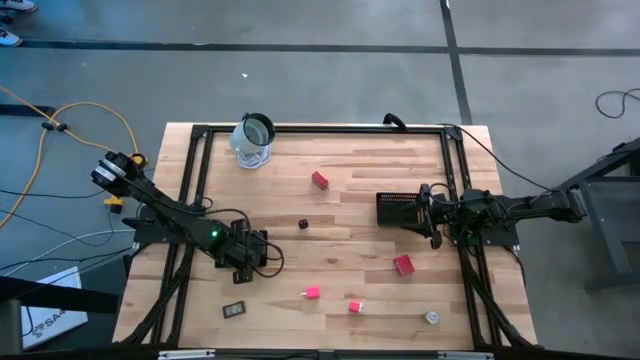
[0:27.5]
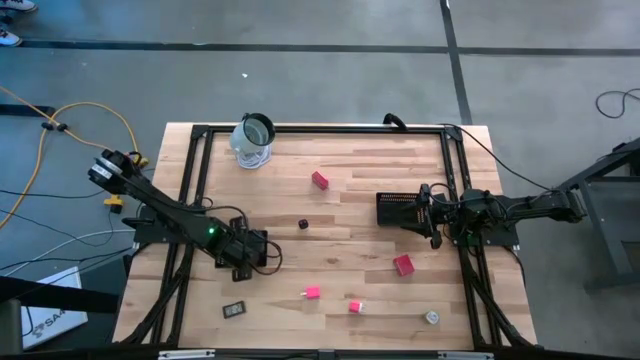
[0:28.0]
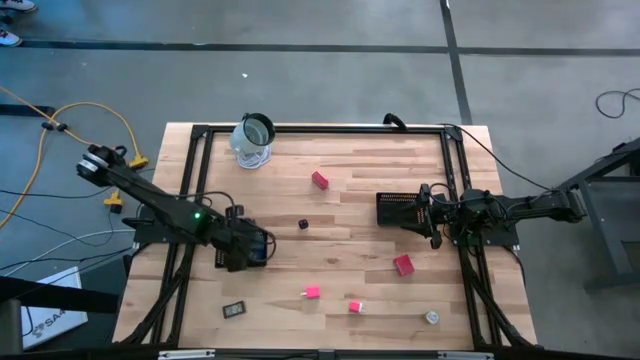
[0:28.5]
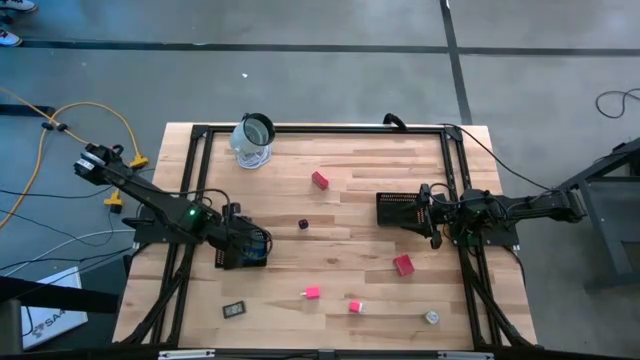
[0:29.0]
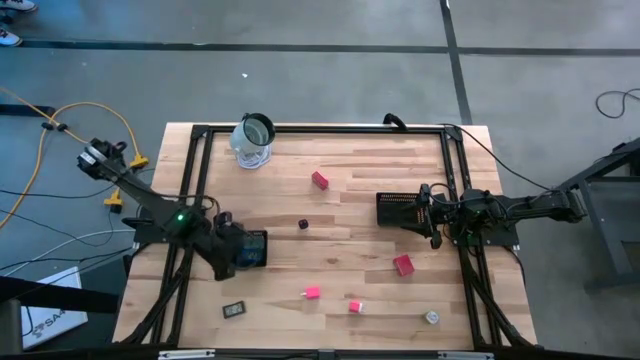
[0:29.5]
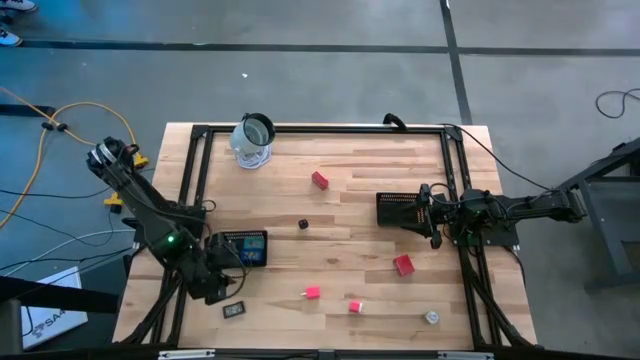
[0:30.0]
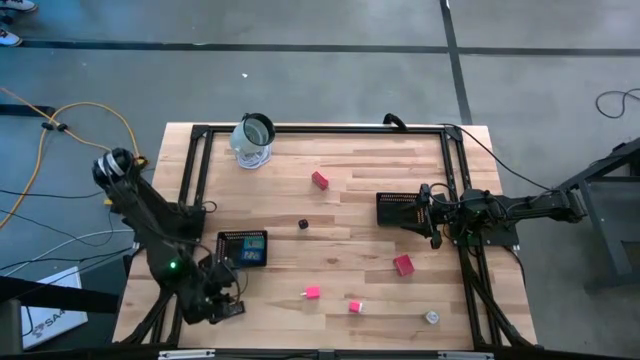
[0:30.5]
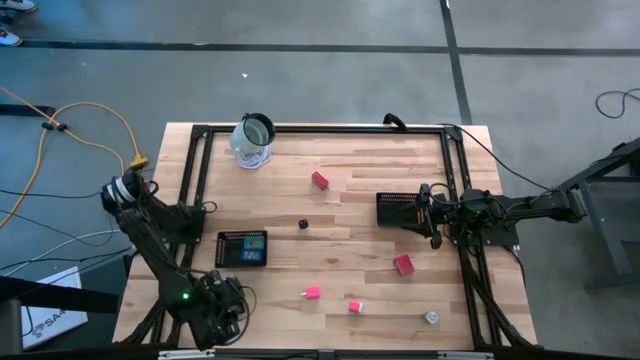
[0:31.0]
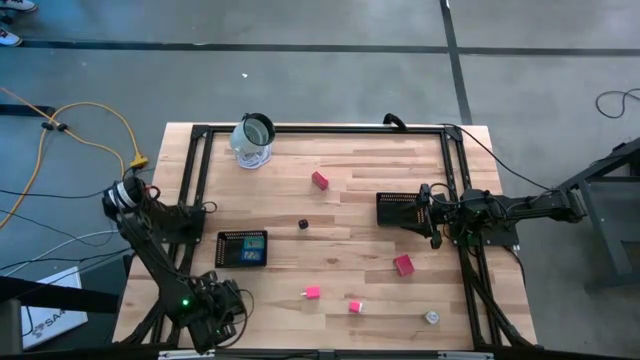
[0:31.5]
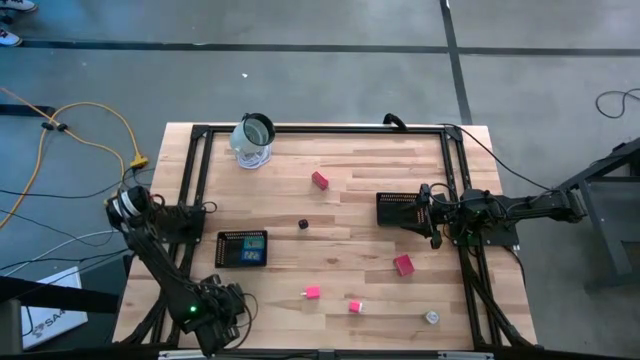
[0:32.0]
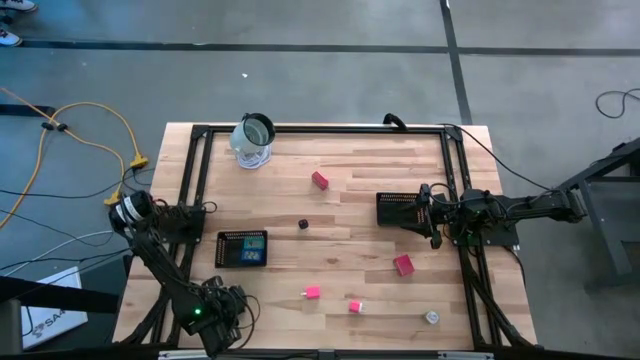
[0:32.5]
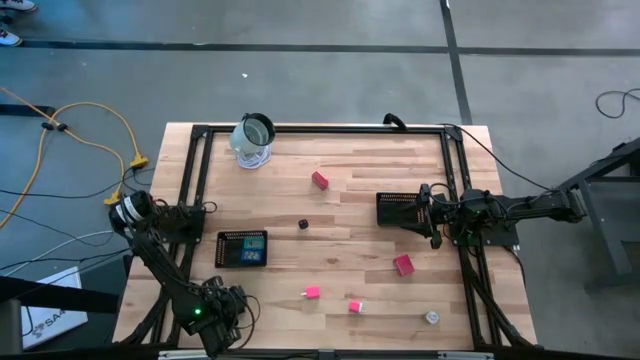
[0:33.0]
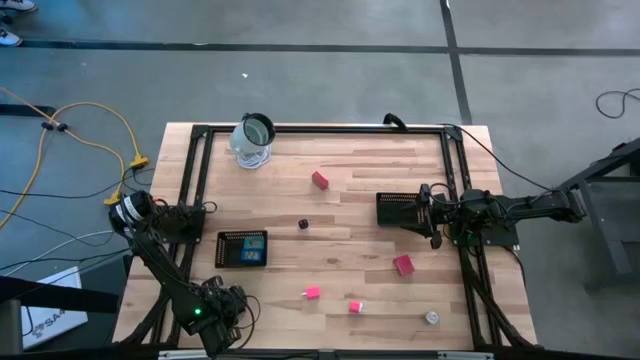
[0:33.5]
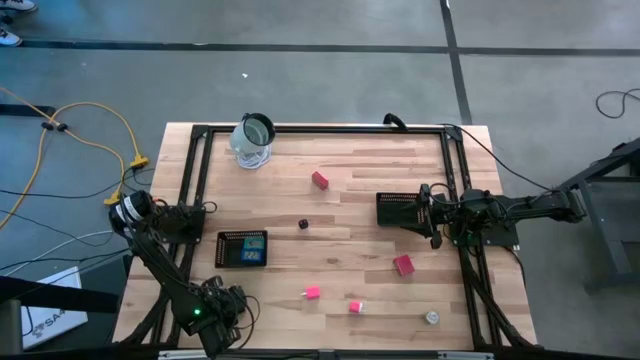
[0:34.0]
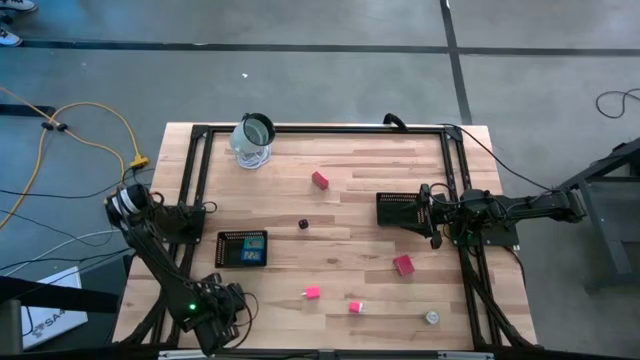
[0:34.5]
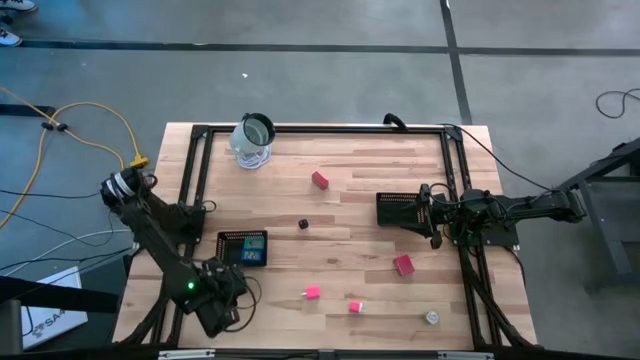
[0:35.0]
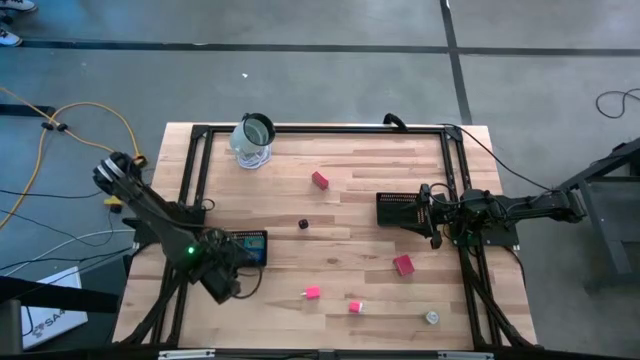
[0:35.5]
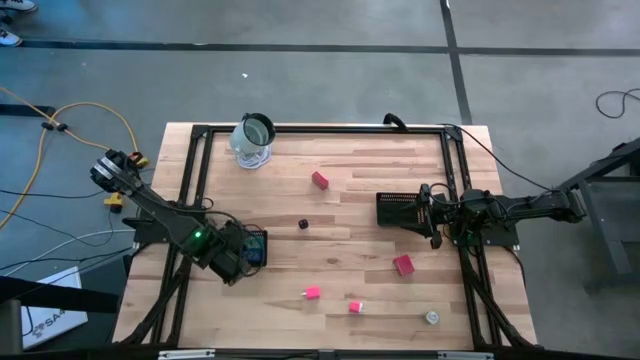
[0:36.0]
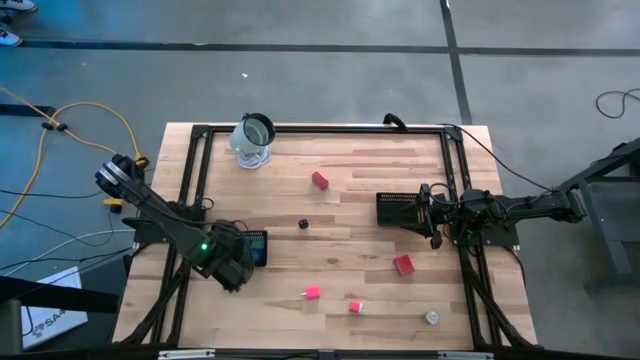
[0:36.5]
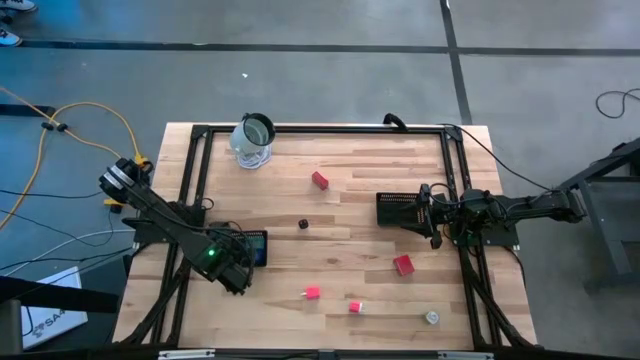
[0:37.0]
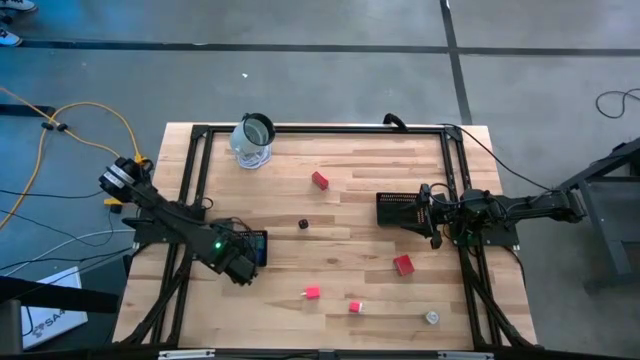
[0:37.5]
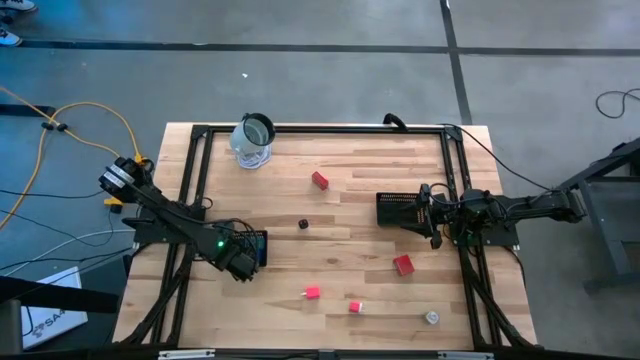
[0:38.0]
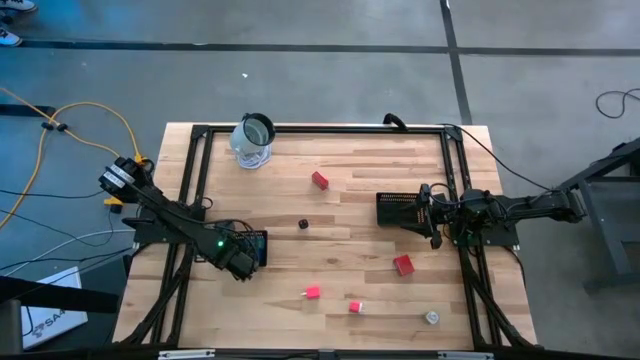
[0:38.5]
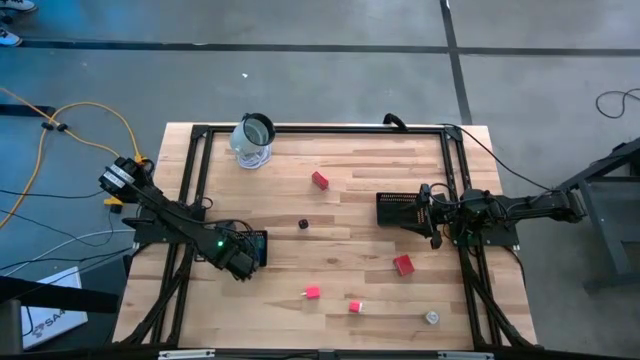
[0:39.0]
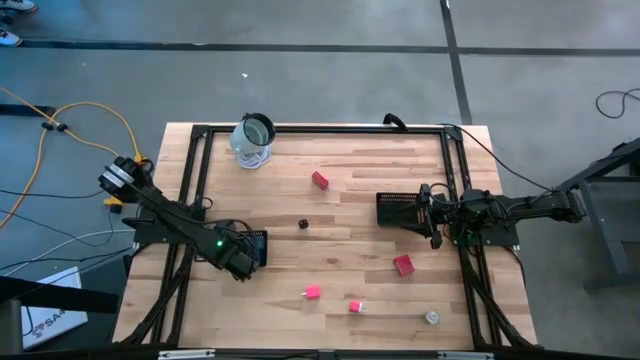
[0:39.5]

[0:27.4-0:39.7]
Task: Pick & Place Office items
Put the black digital timer into the left black bin

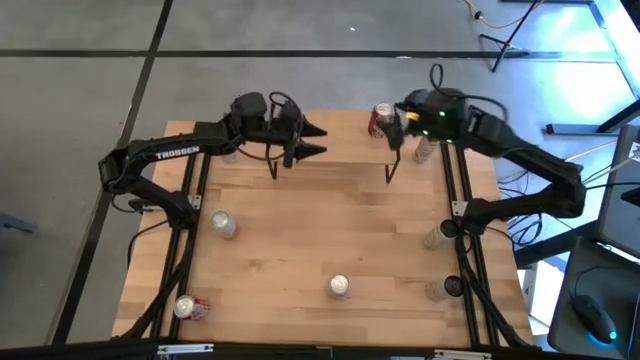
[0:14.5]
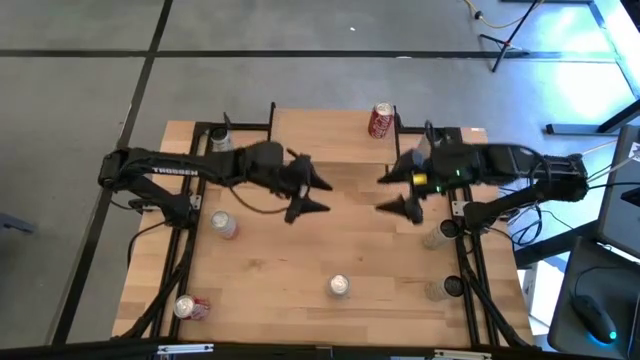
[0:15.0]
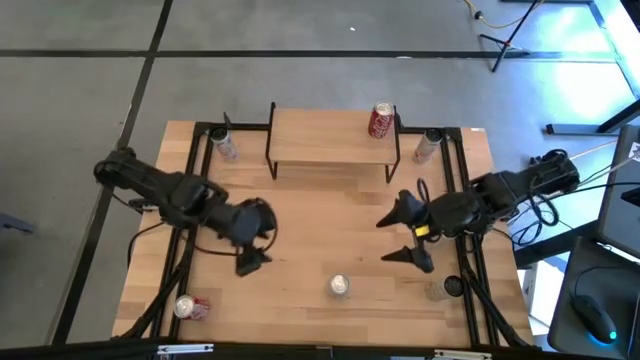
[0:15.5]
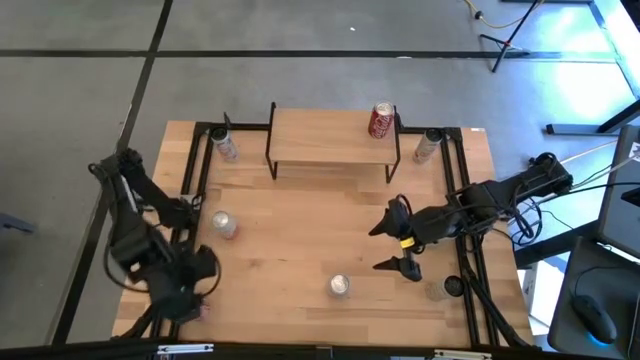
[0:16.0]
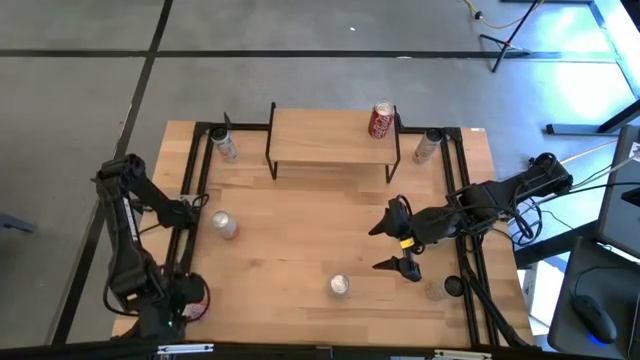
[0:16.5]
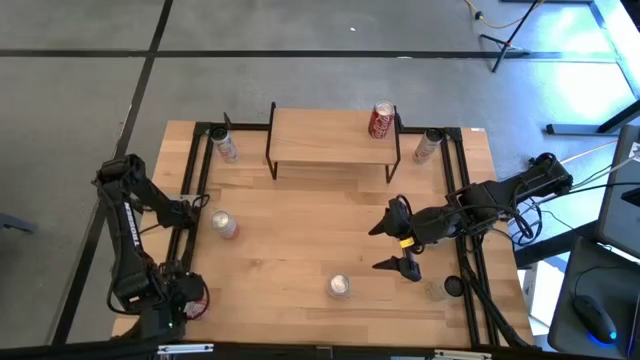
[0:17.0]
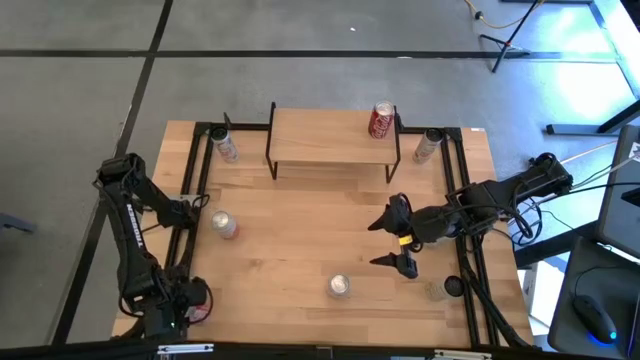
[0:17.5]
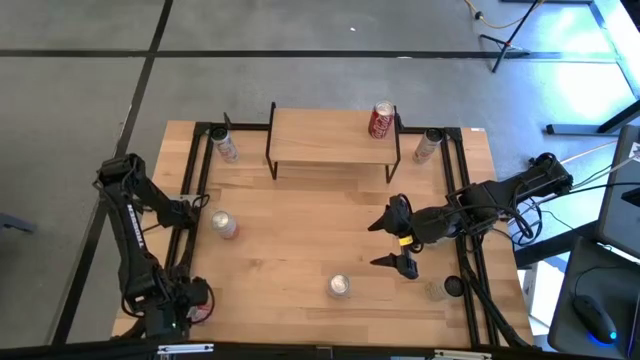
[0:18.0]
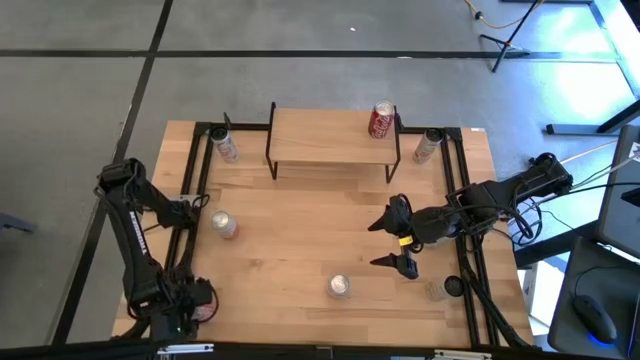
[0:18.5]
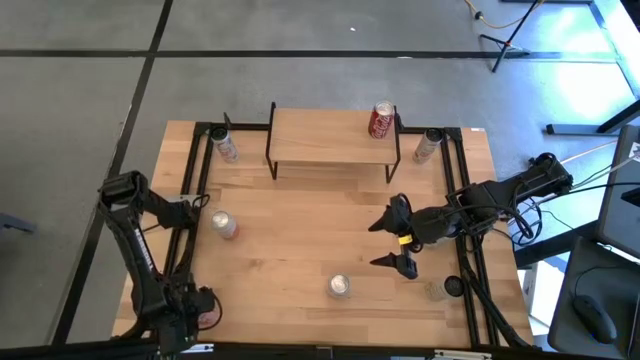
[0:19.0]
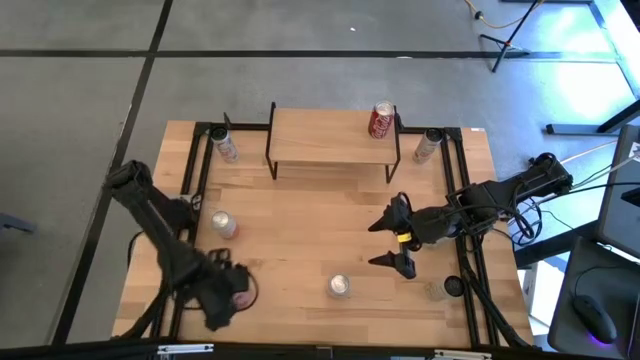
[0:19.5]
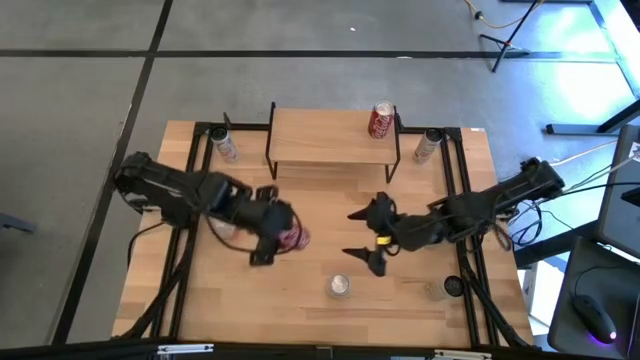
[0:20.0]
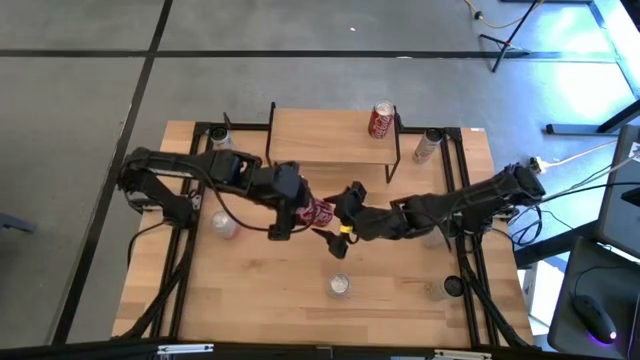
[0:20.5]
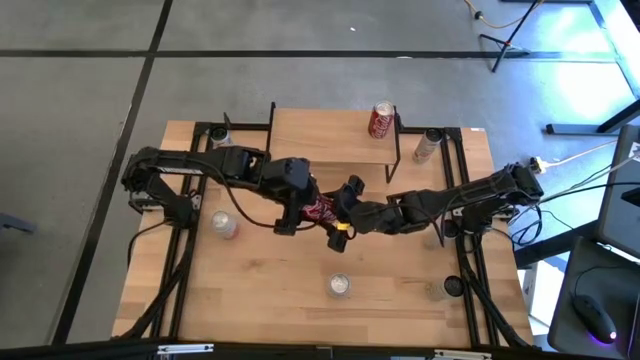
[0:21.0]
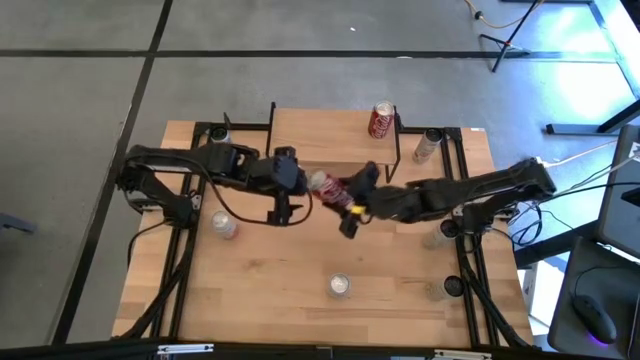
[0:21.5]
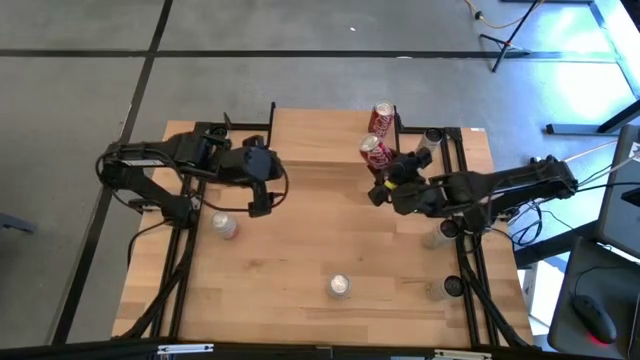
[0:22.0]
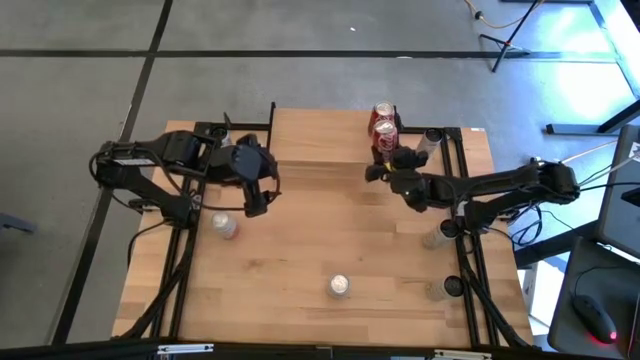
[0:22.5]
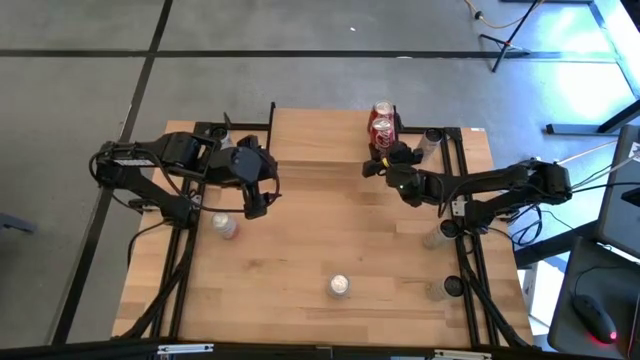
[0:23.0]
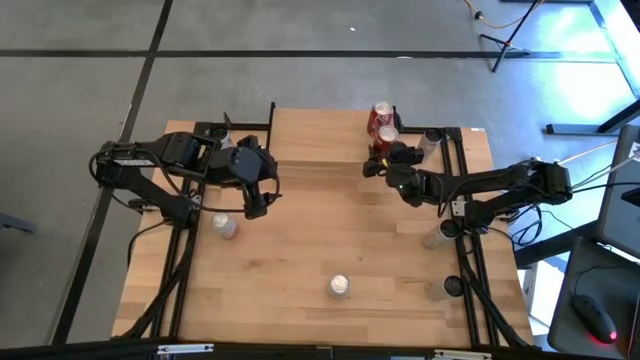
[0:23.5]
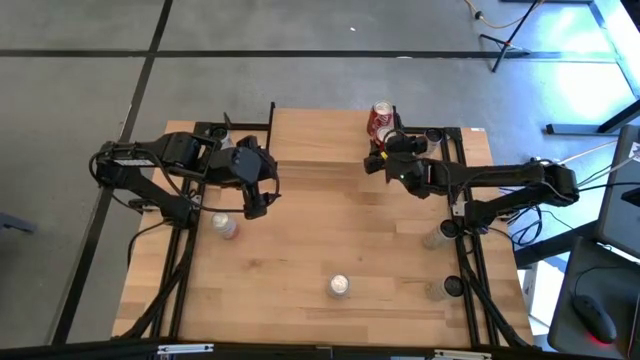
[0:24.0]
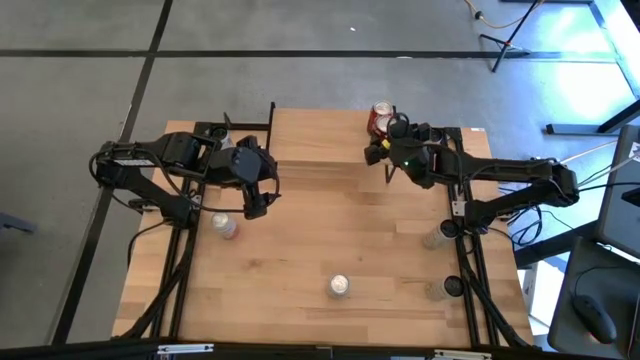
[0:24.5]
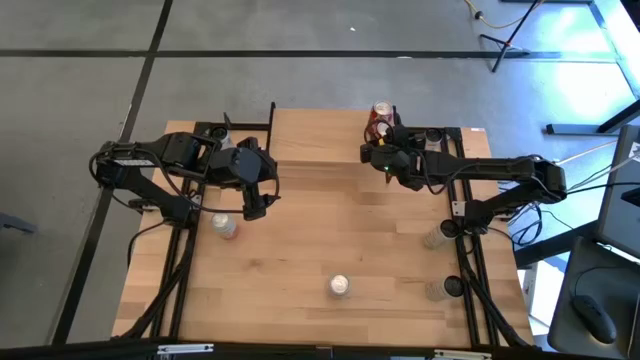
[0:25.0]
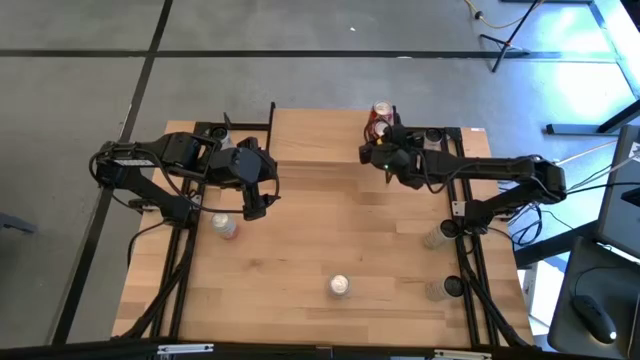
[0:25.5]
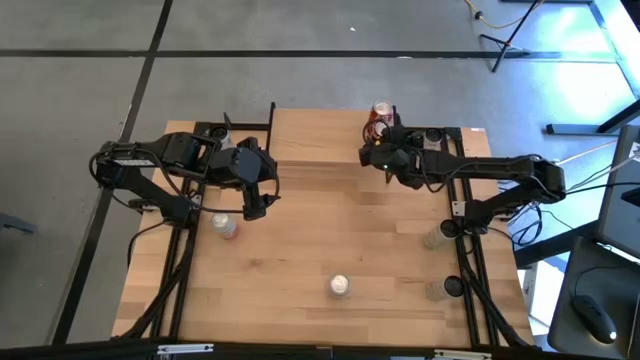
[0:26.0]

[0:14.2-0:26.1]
Task: Place canned beverage on shelf
Put the red soda can on the shelf aligned with the other red soda can
